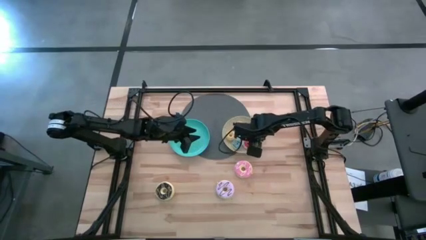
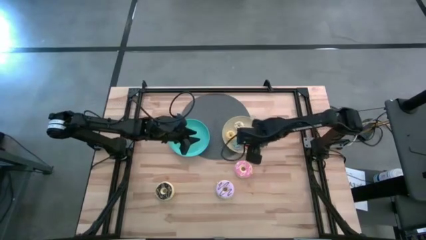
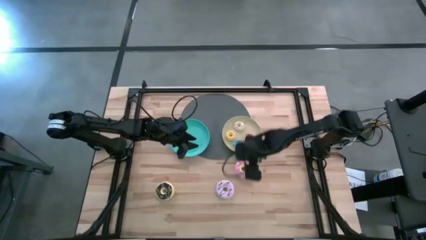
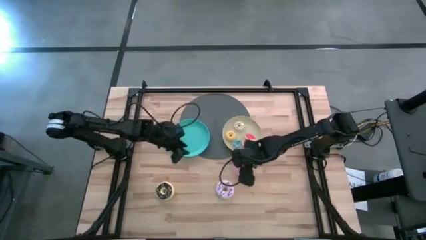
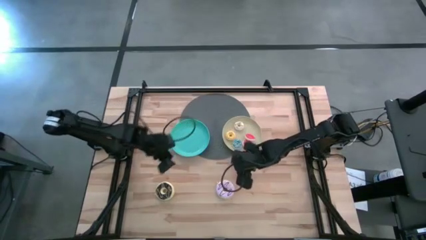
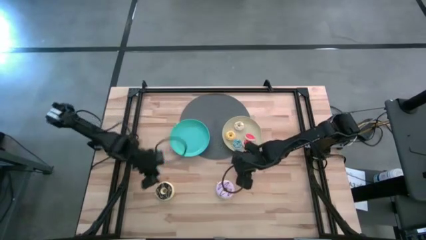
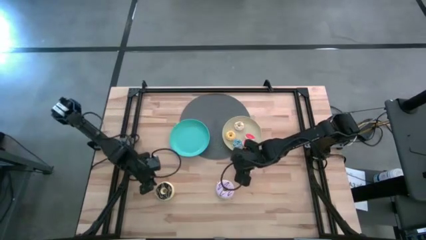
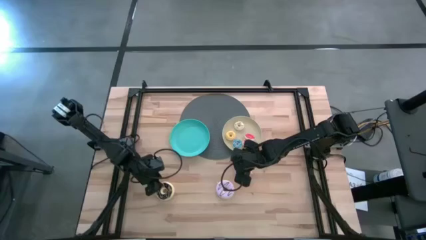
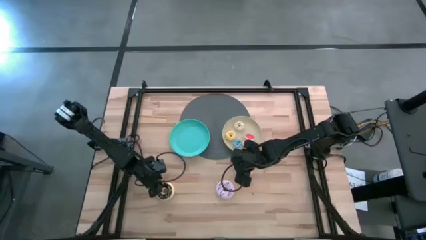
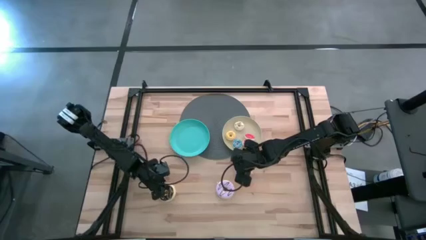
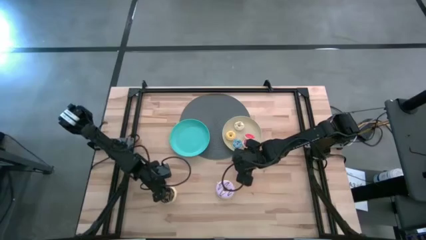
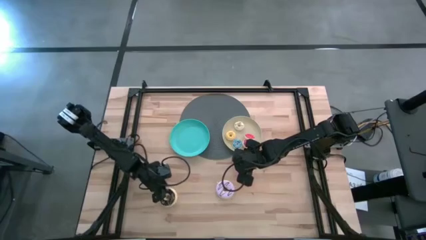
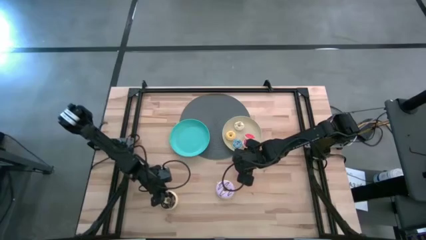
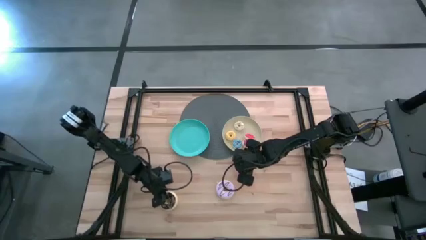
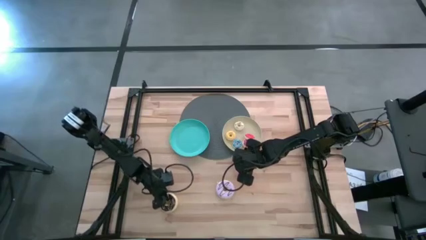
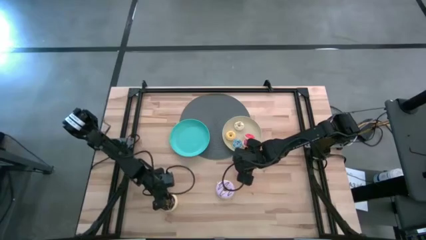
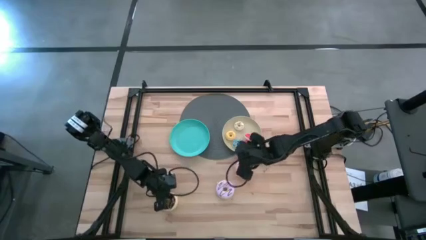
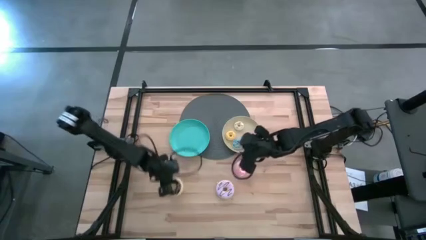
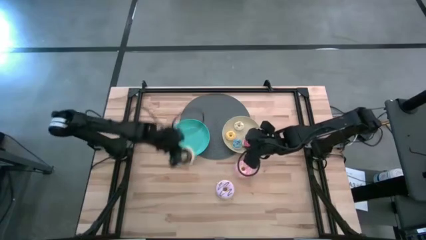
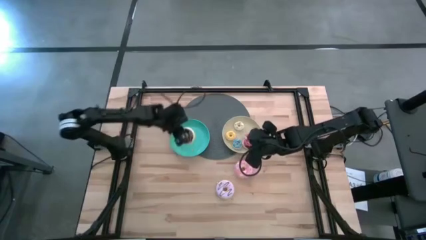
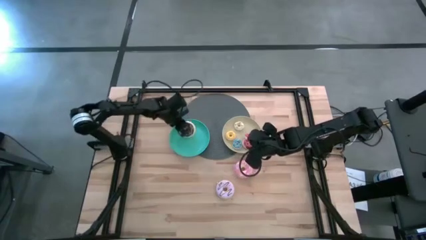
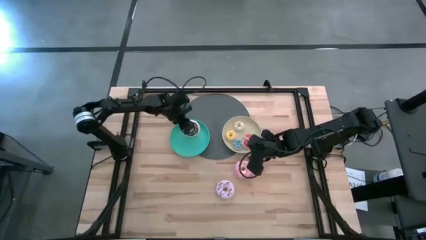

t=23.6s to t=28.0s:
Task: Pick & Place donuts
Put the large black donut on the blue plate

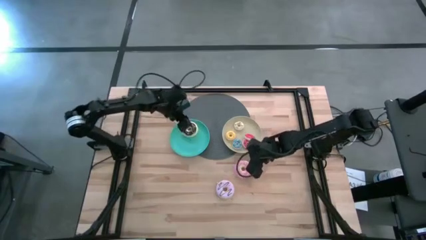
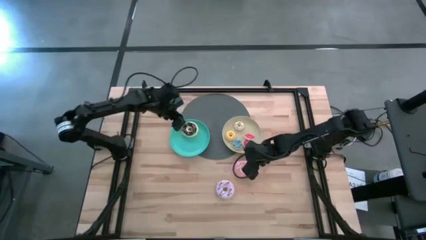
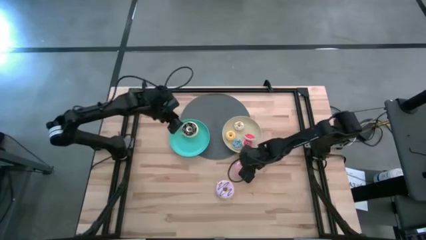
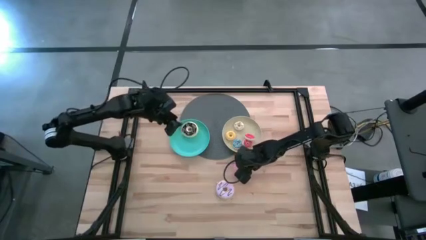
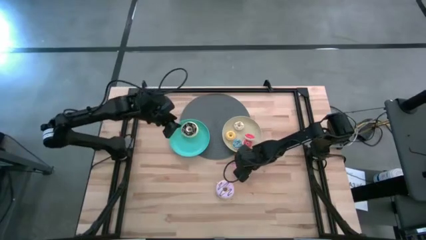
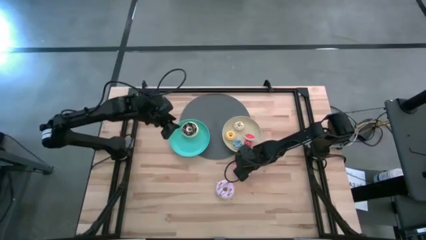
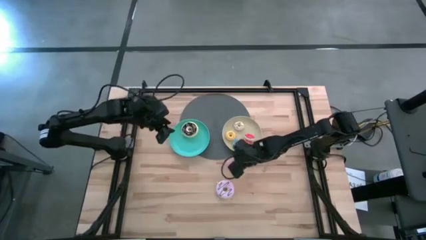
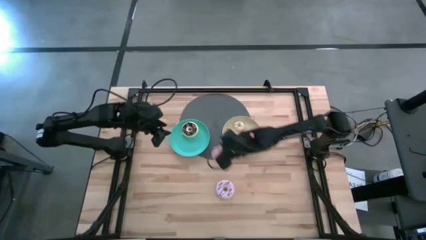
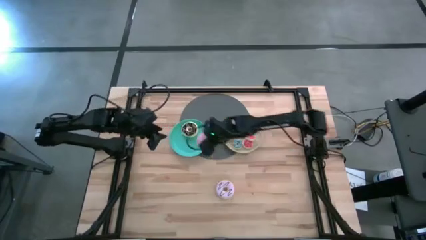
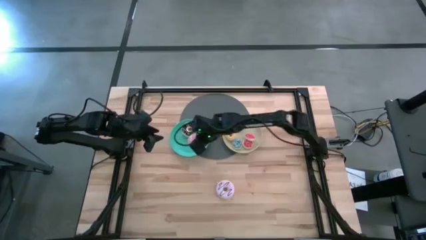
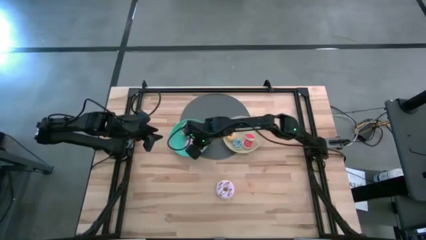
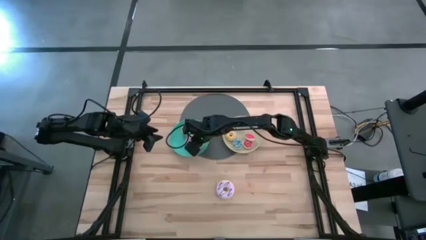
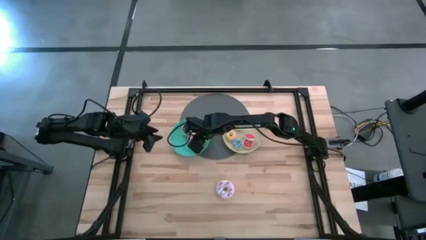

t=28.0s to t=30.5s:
Put the large pink donut on the blue plate

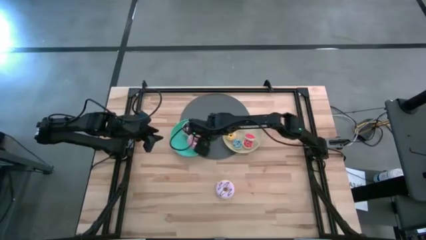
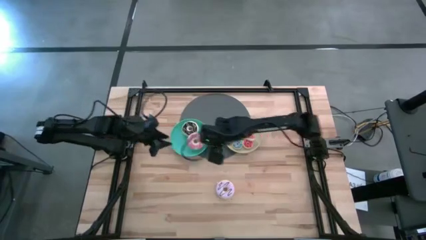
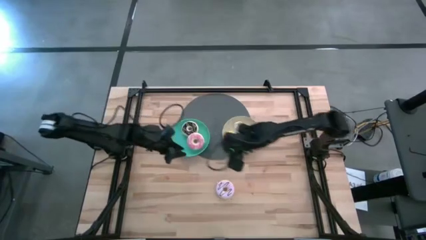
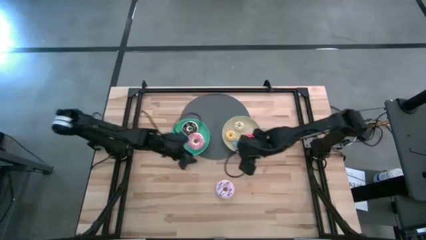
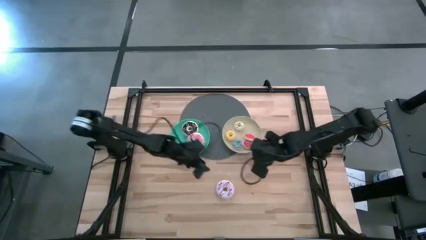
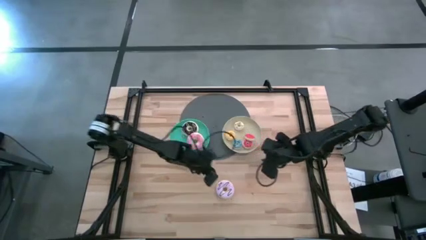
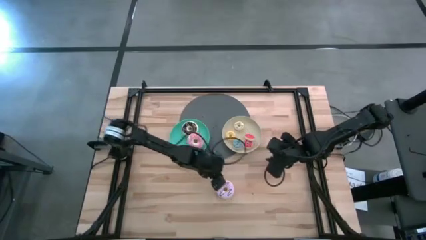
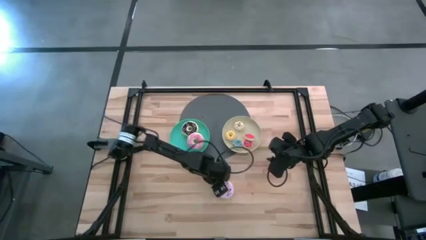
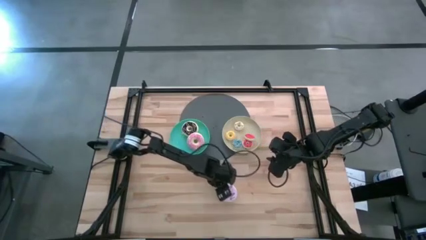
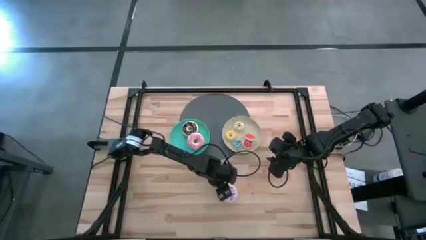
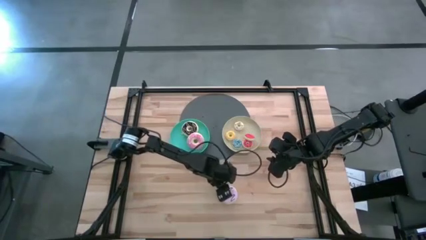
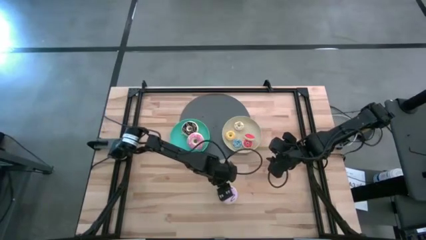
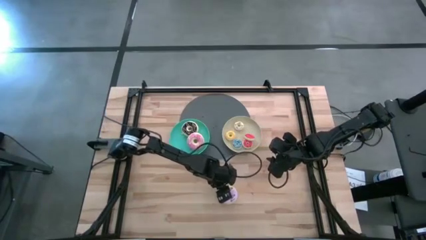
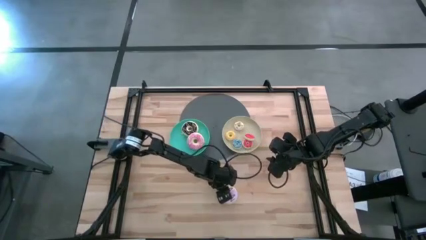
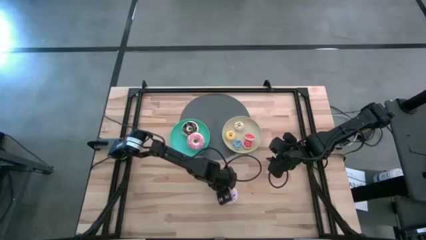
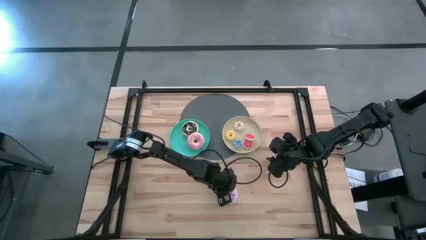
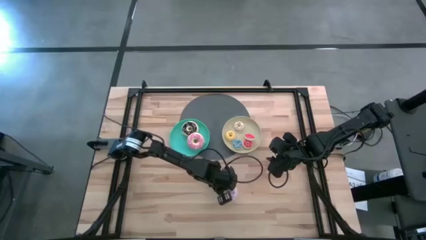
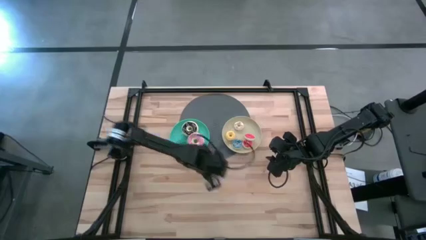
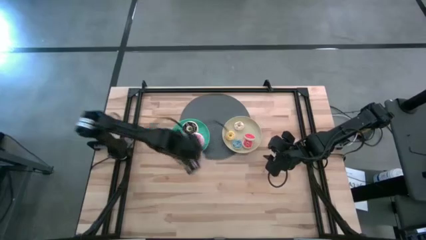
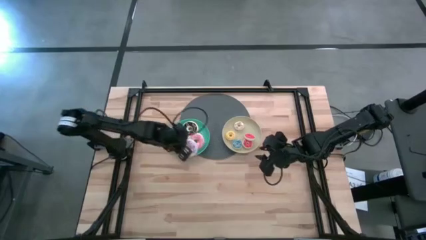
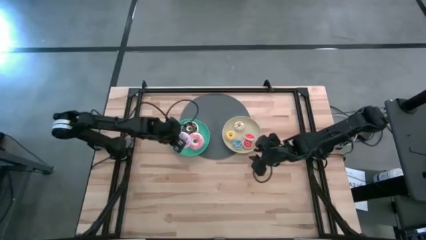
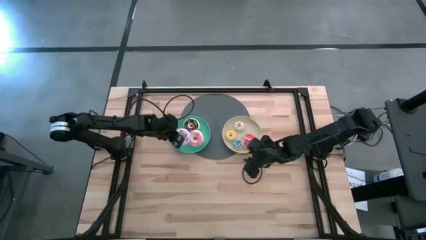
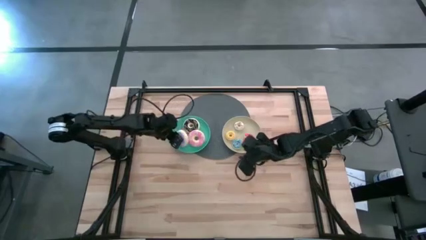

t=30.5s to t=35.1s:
Put the large purple donut on the light blue plate

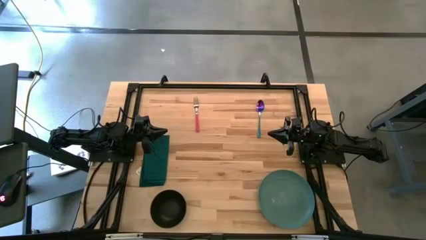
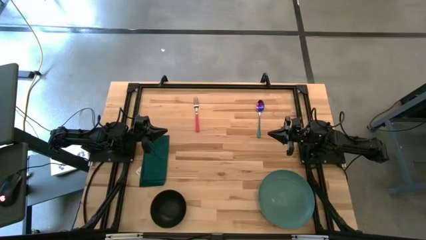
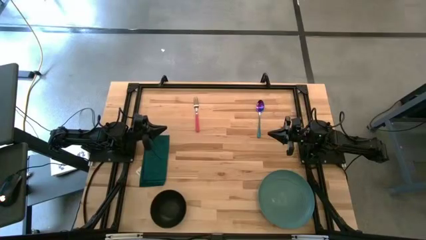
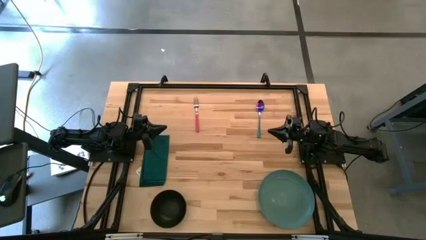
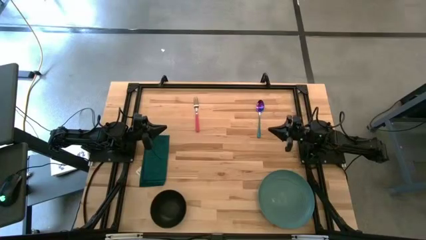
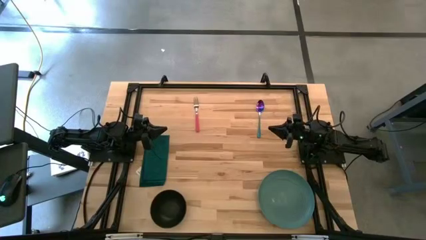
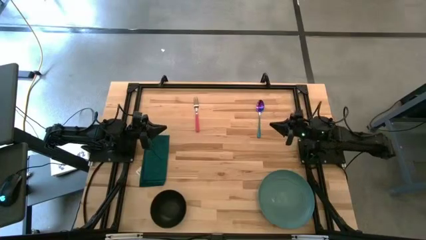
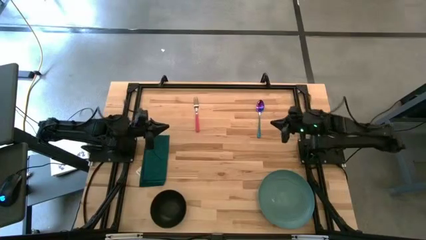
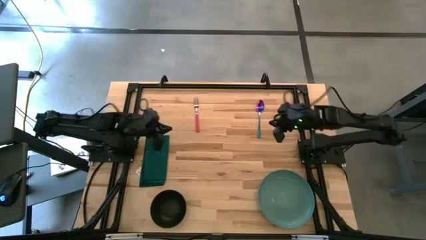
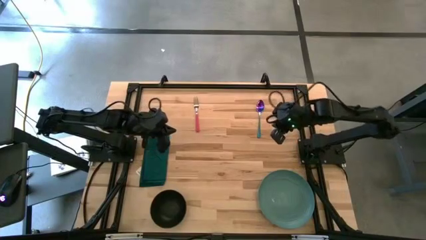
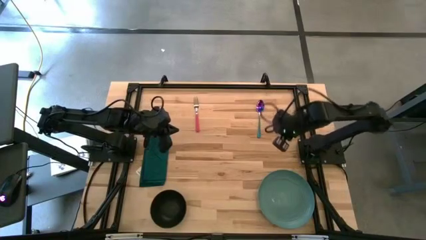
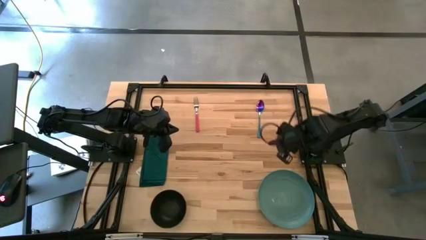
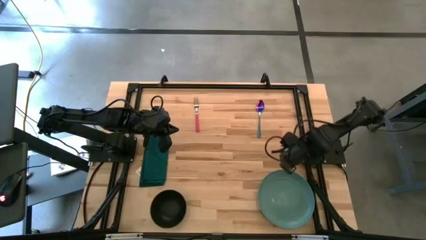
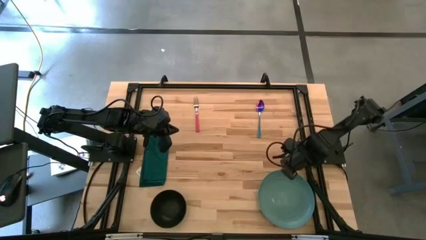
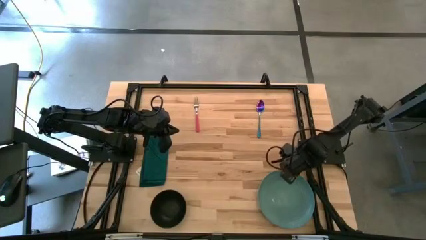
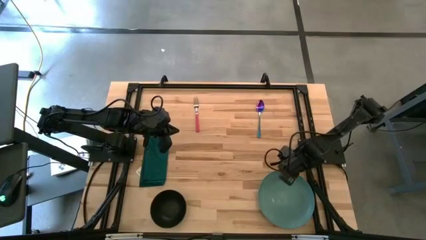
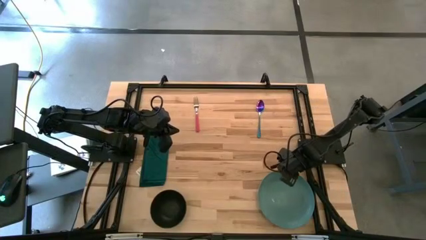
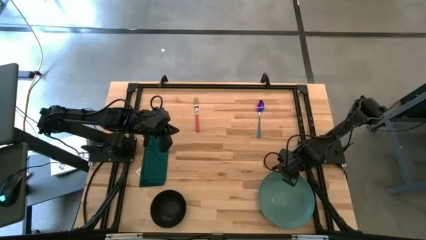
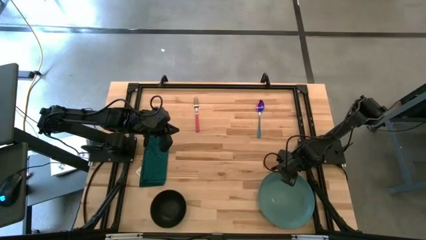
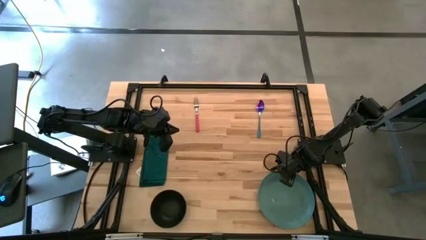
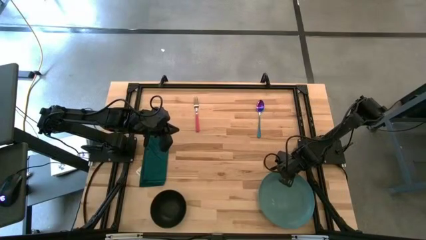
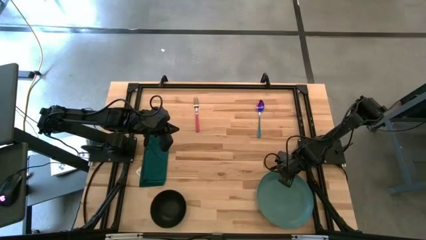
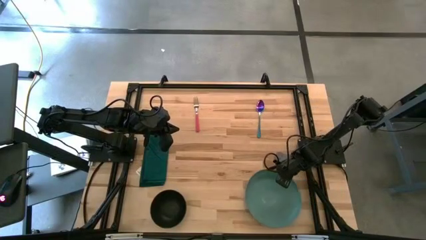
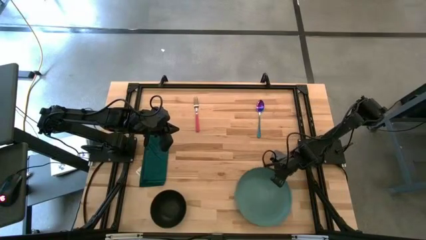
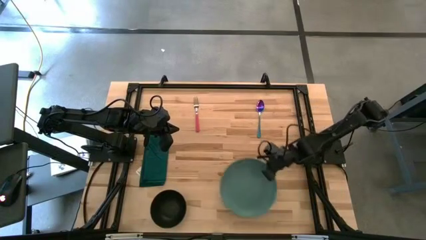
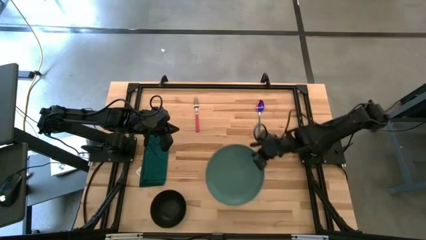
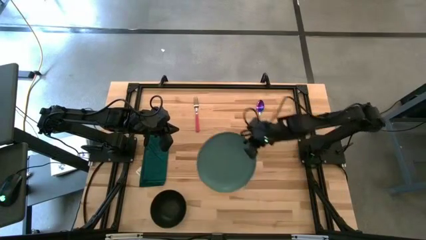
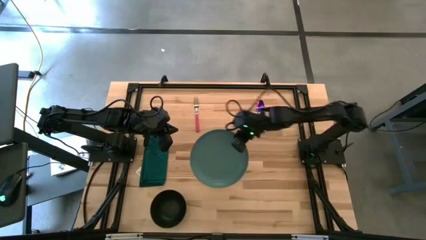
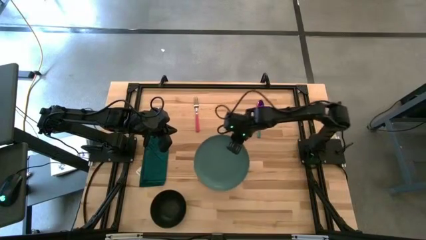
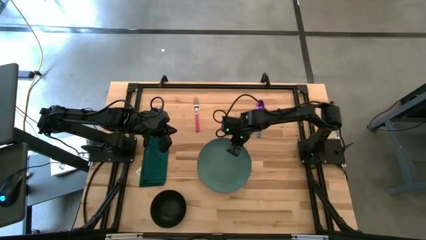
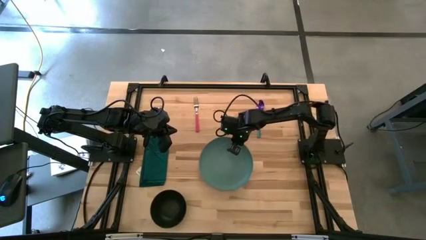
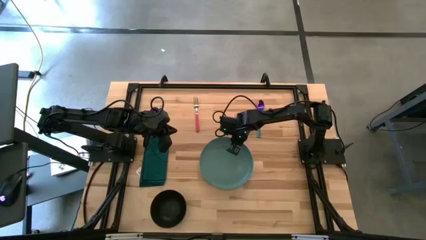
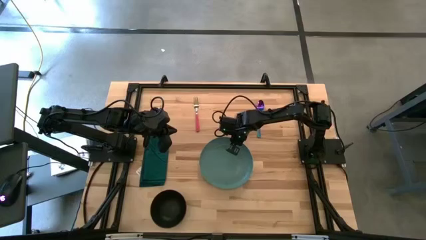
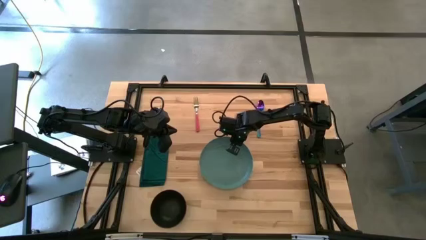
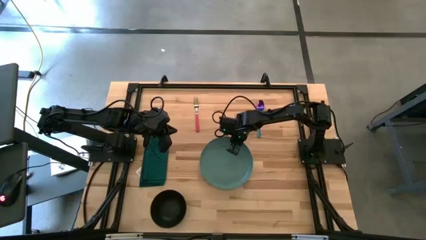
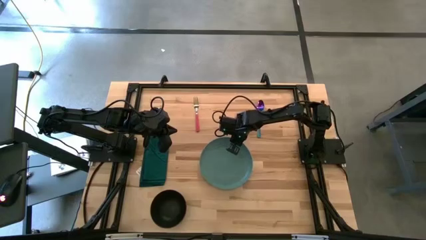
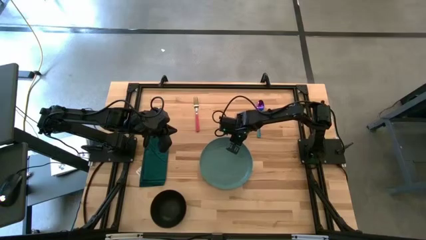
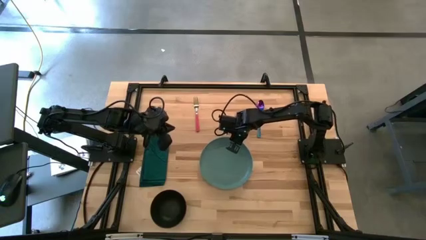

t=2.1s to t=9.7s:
Task: Set table place
Move the green plate to the center of the table
